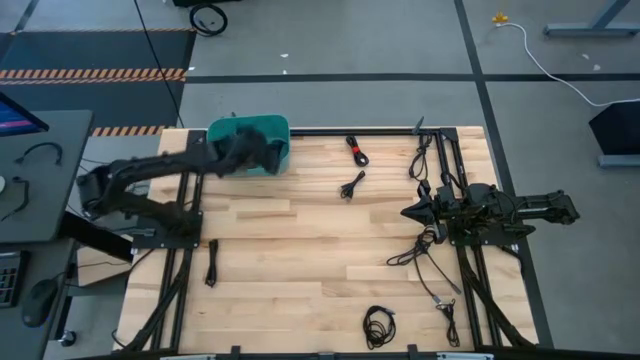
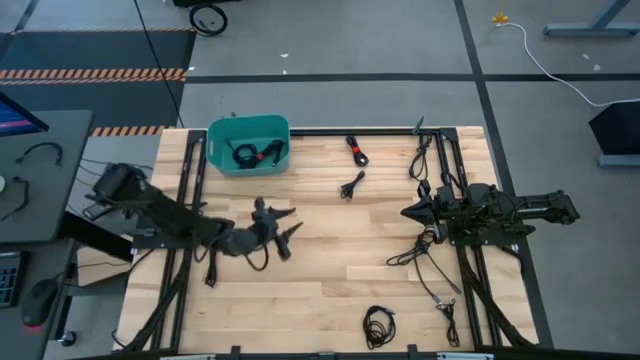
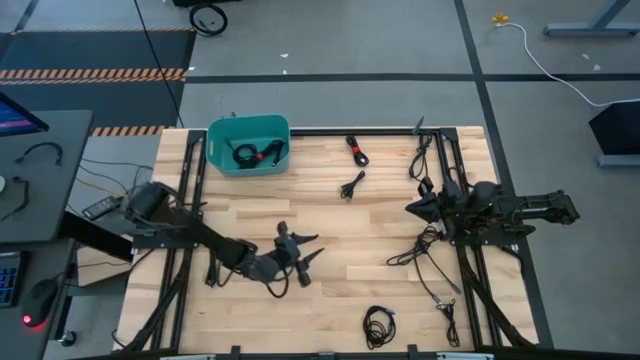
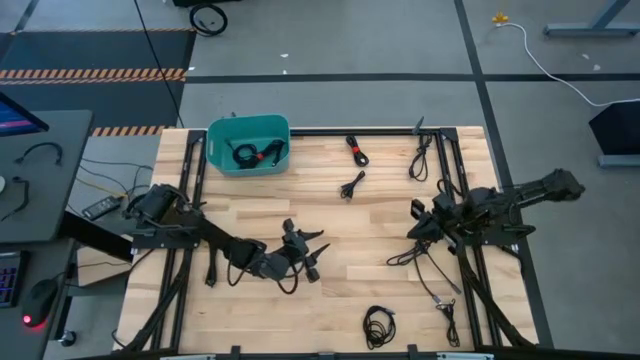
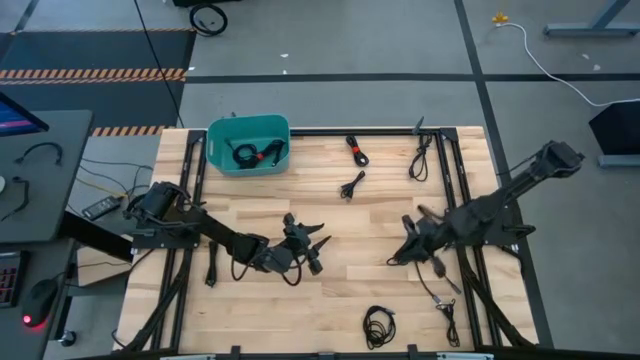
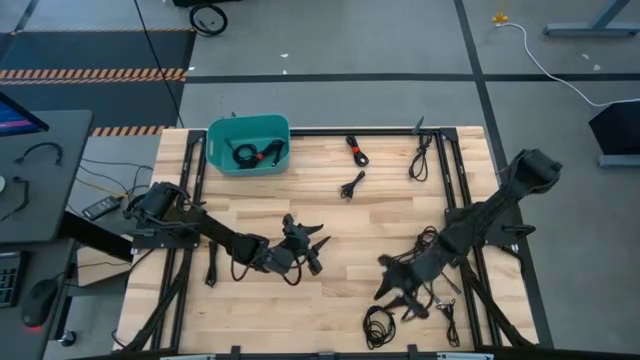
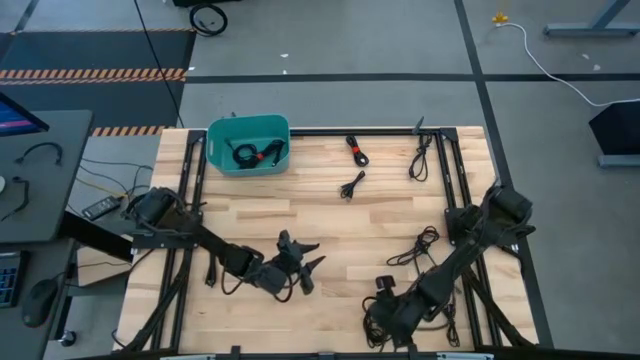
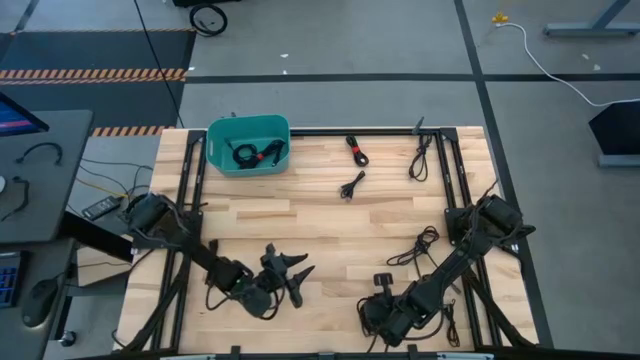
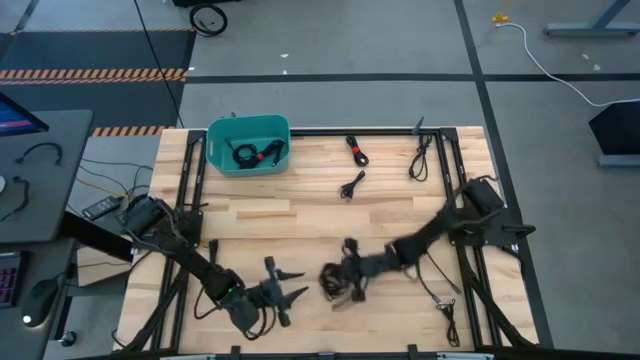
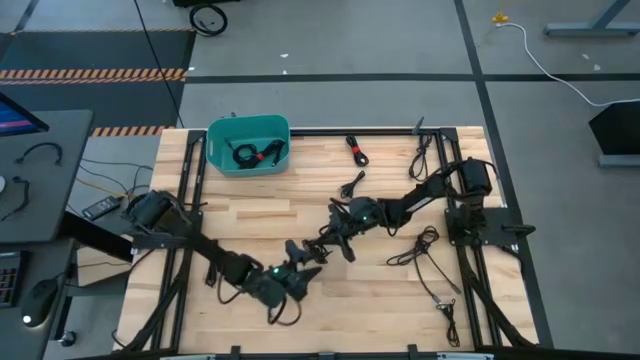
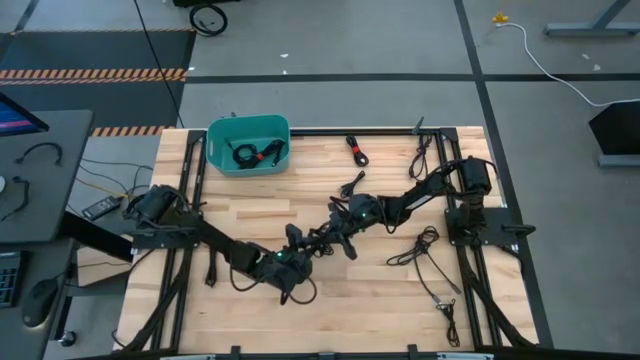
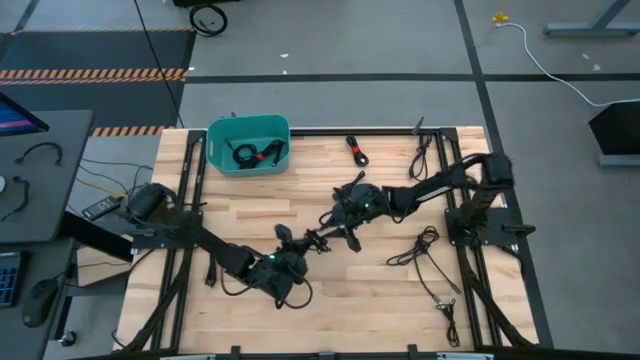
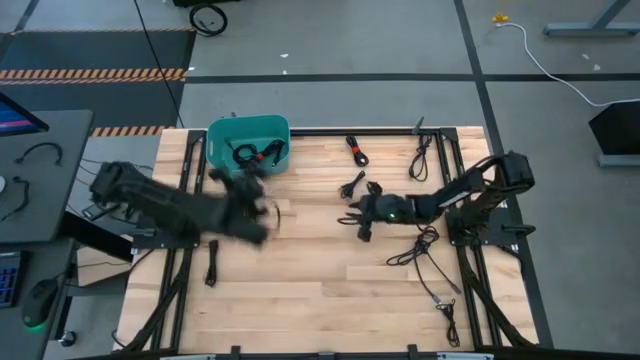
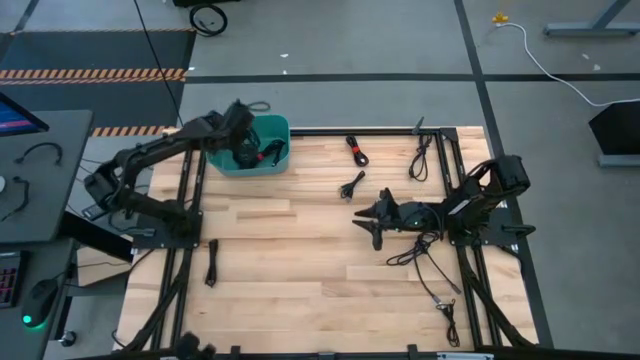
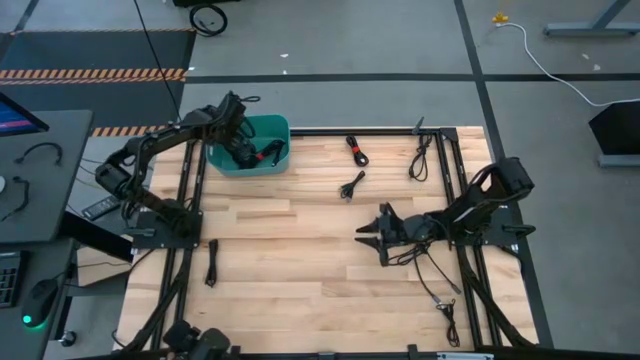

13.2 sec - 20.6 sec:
Task: Pick and place USB-C Cables
Put the black charger cable into the blue bin

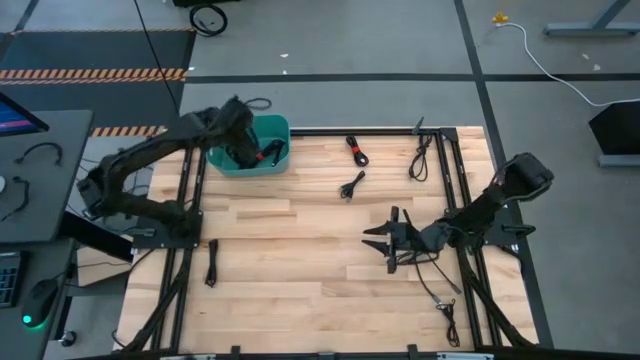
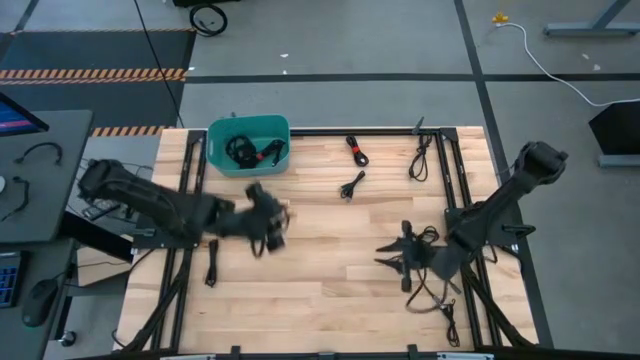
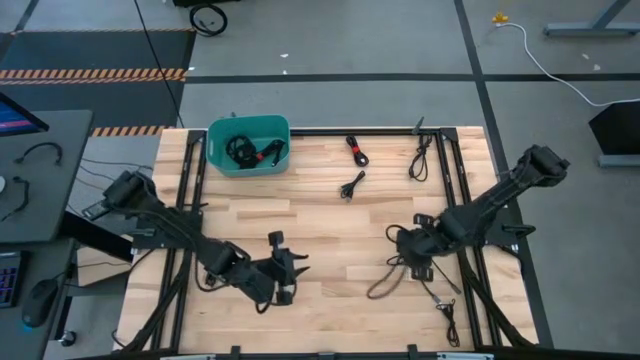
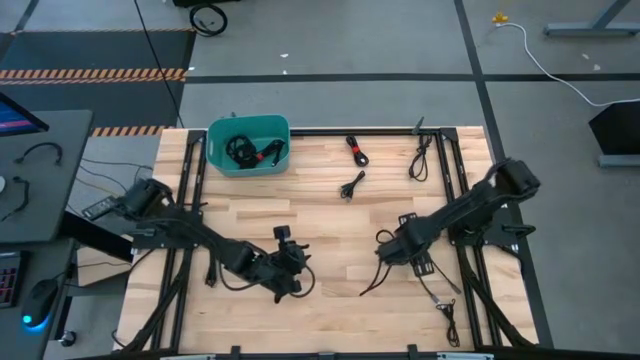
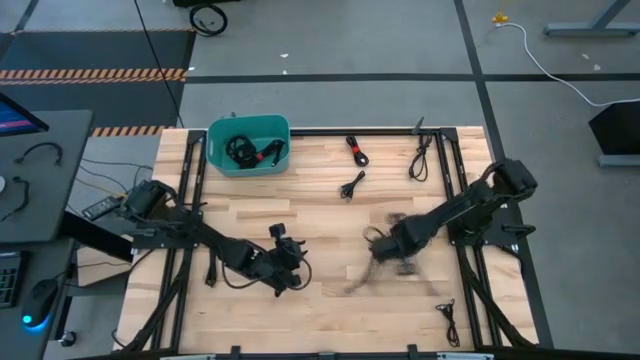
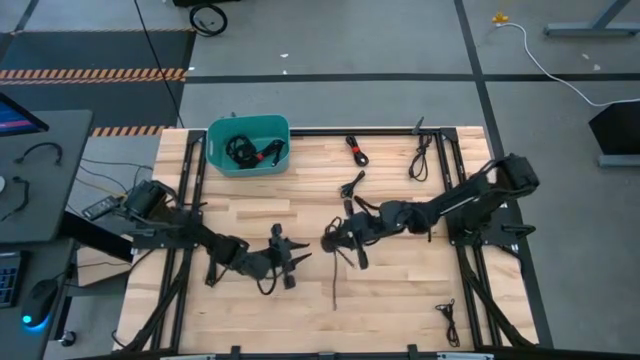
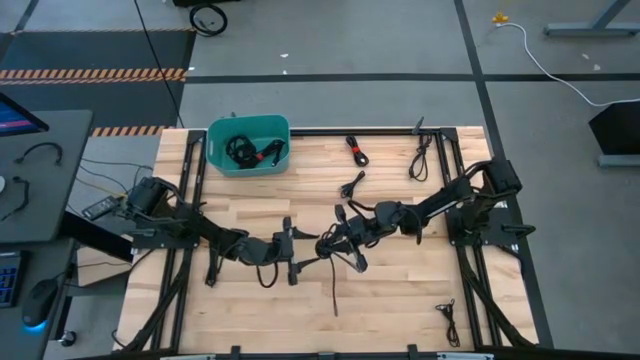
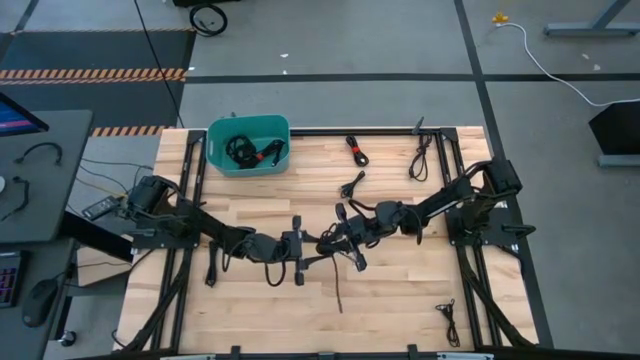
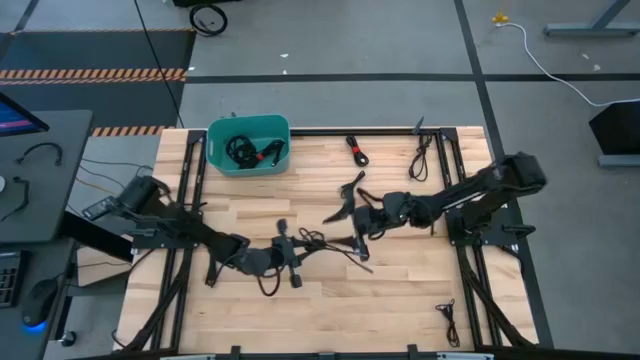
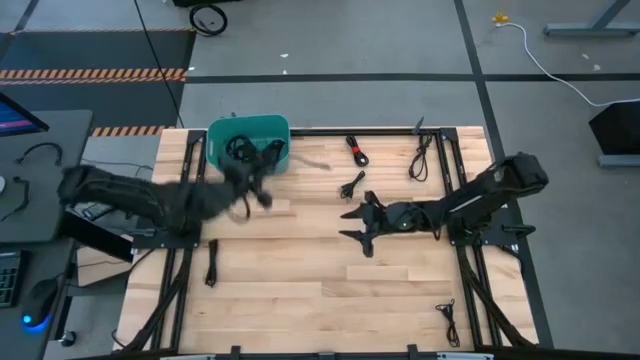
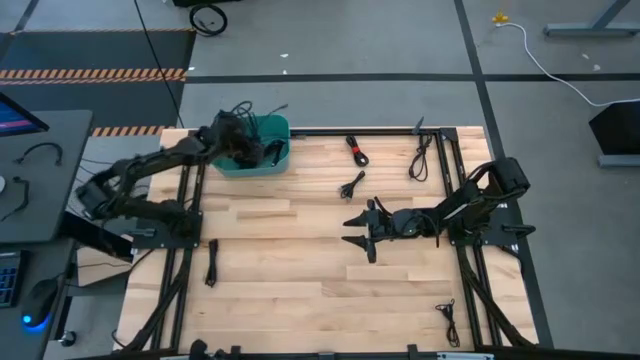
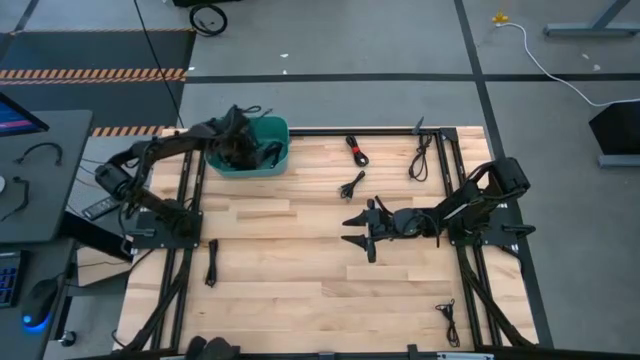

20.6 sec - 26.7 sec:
Put the black charger cable into the blue bin

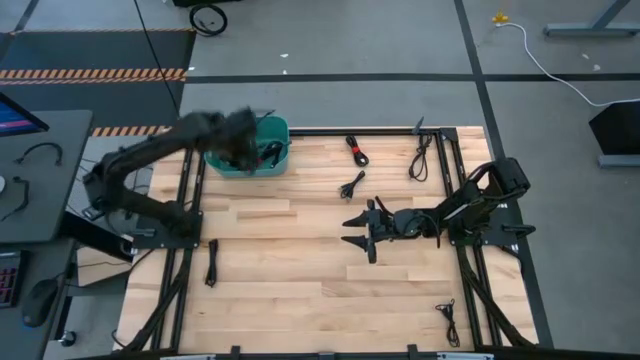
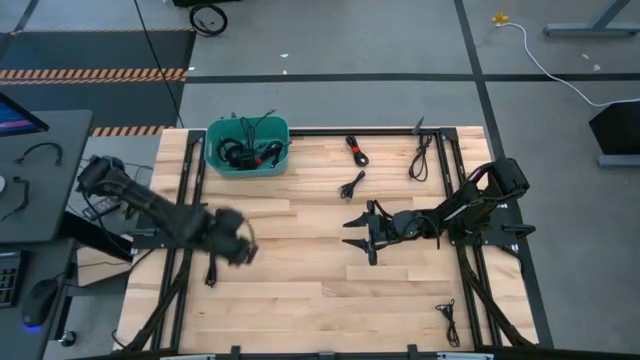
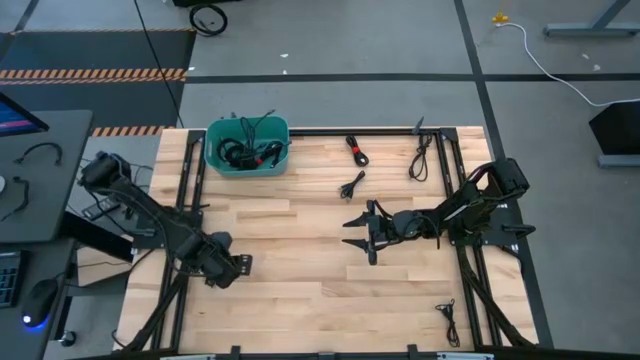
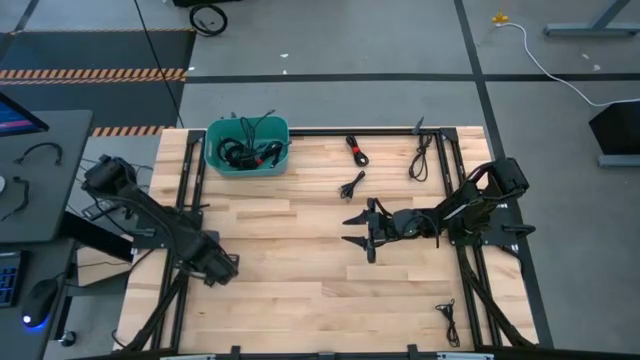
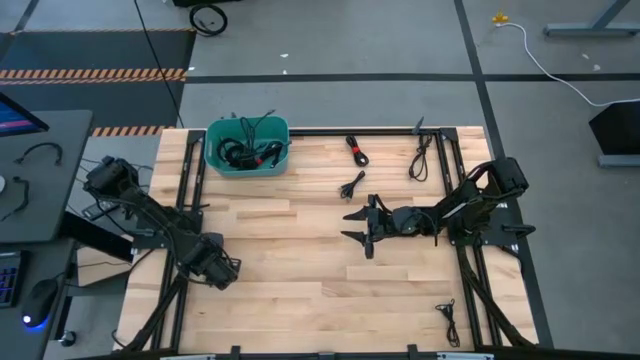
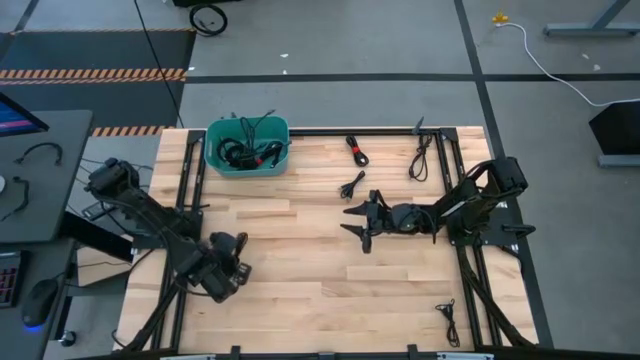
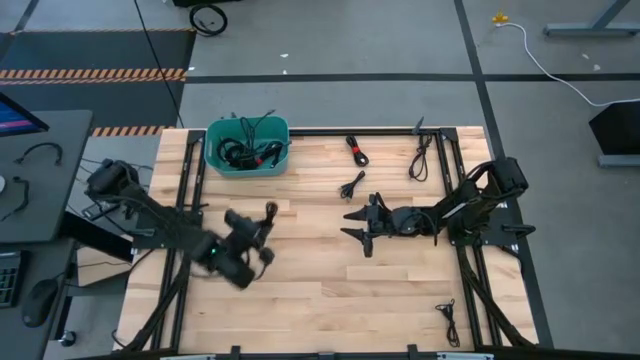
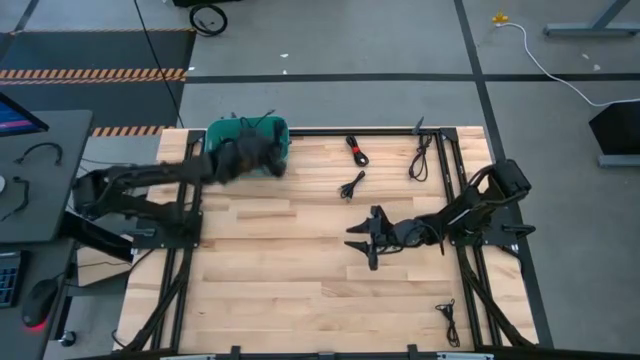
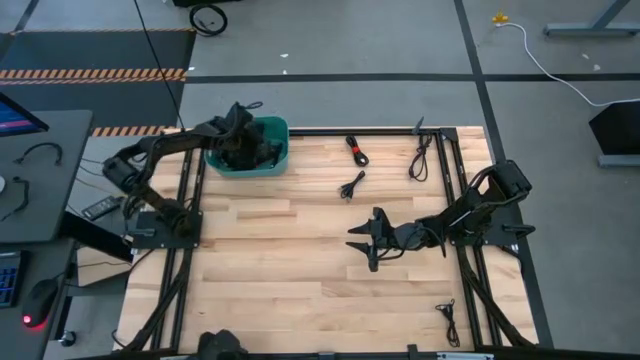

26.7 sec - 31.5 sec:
Put the black charger cable into the blue bin

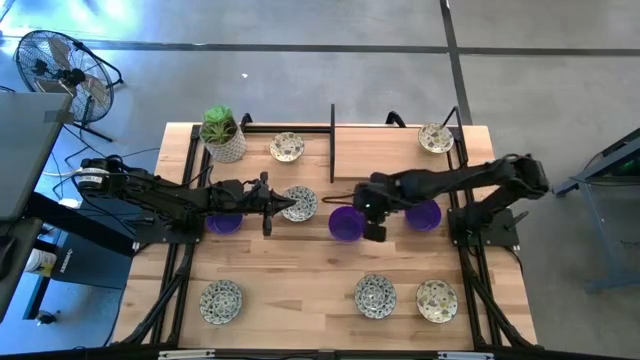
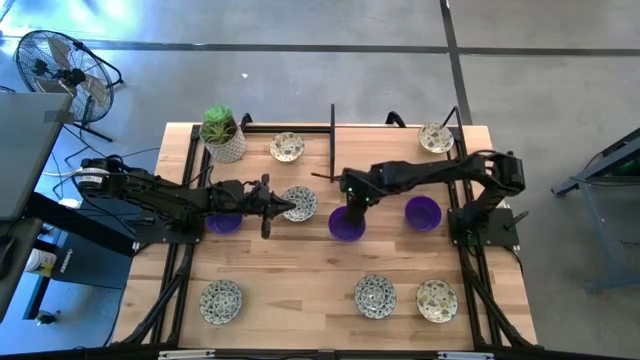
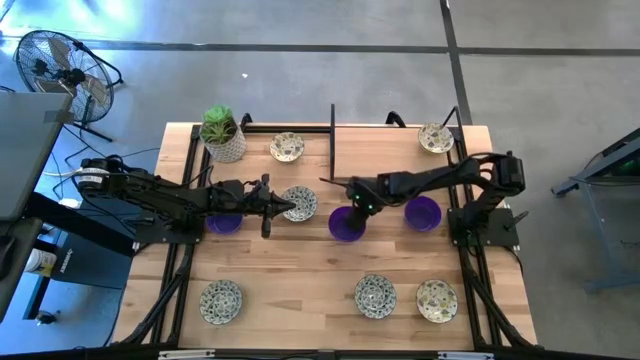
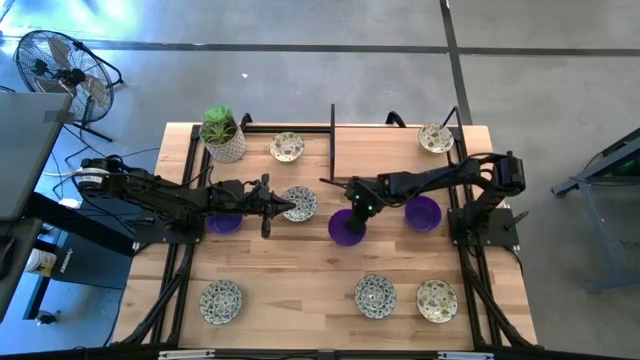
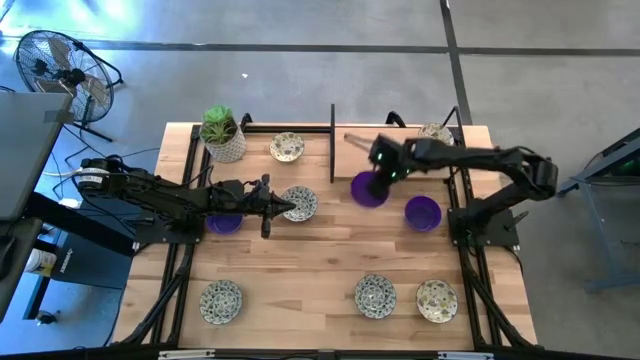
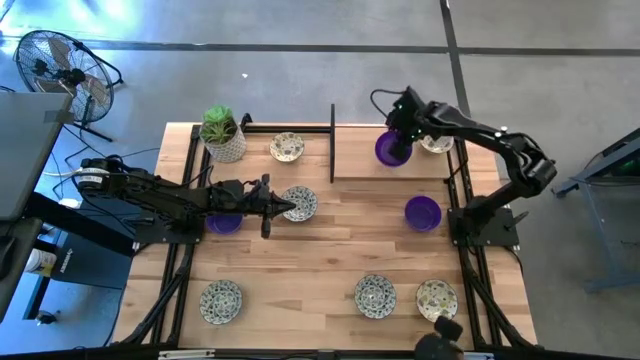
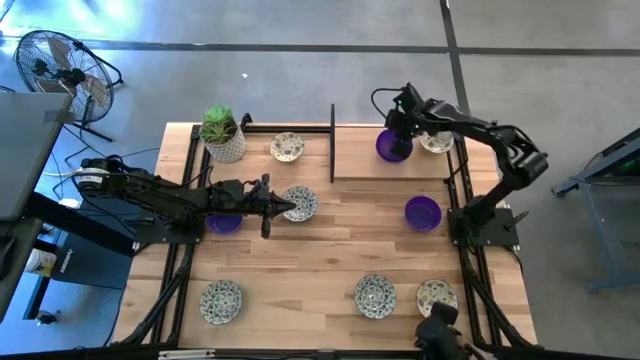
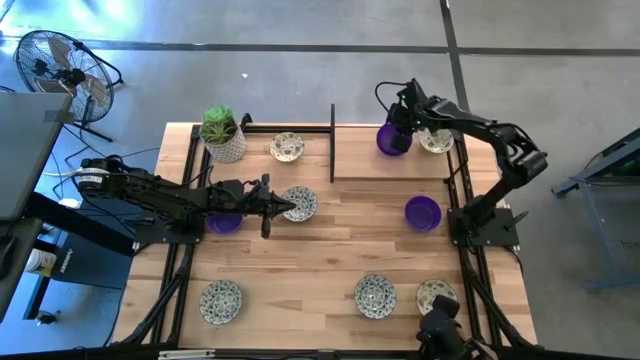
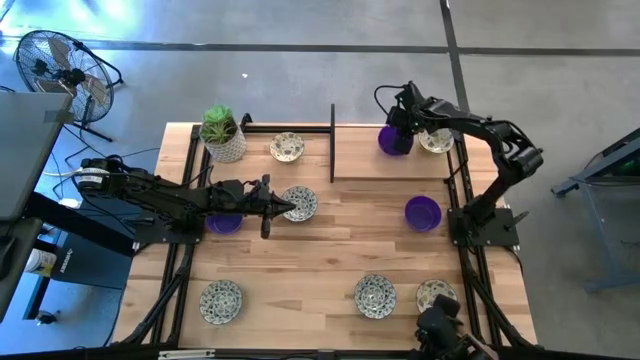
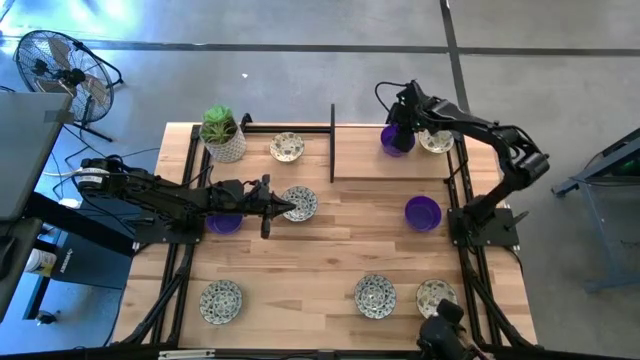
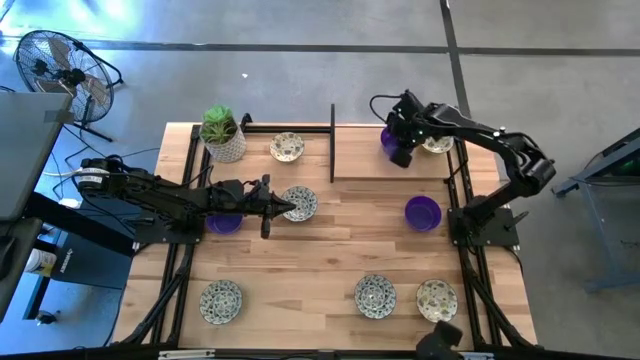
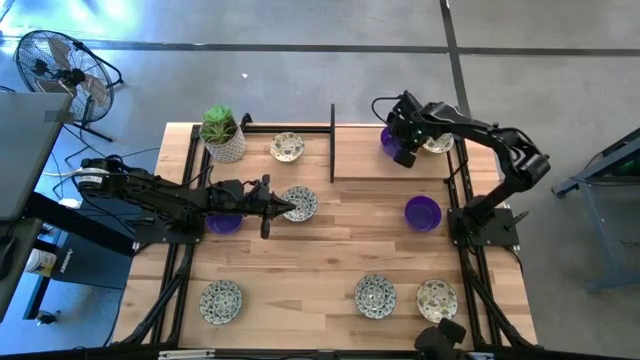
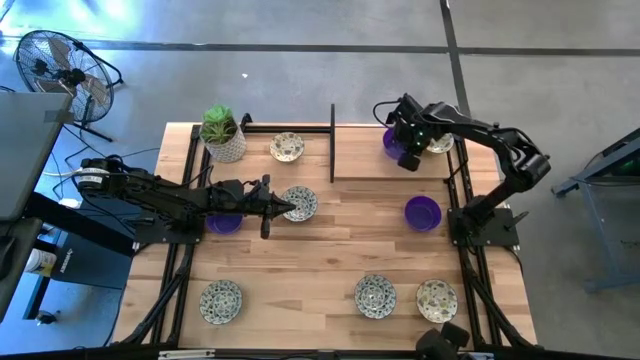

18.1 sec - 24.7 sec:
Task: Pick & Place Mini bowls
Put the bottom blue bowl on top of the shelf
